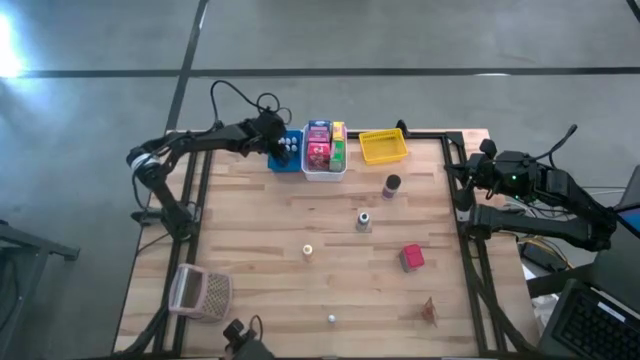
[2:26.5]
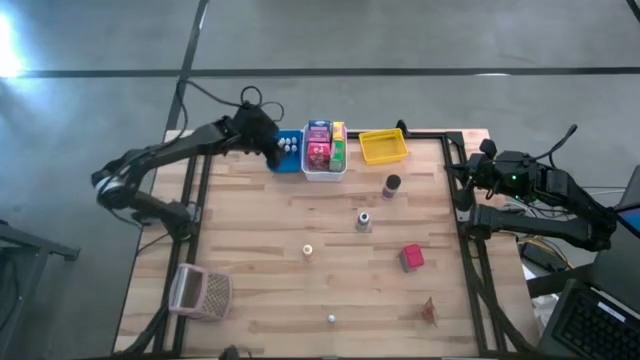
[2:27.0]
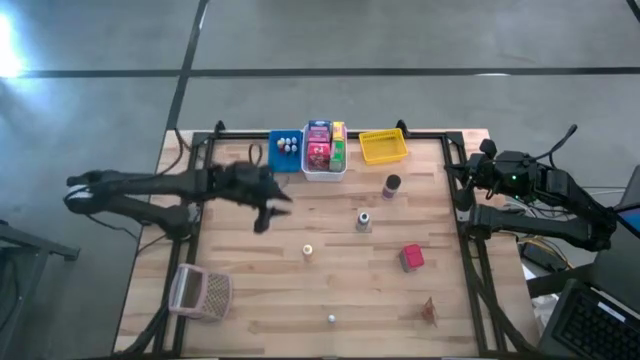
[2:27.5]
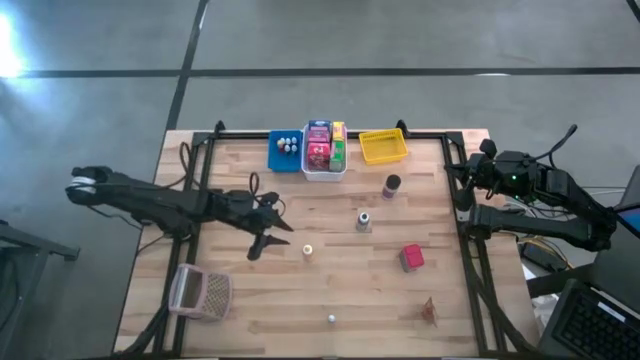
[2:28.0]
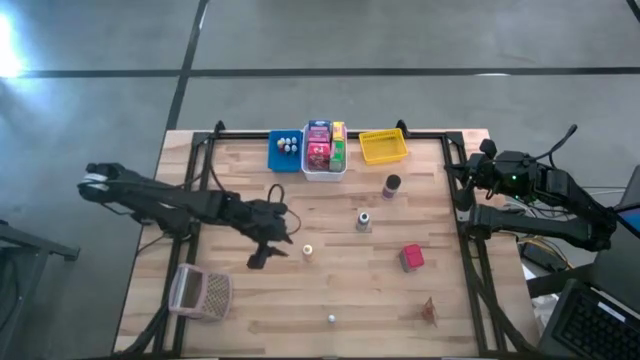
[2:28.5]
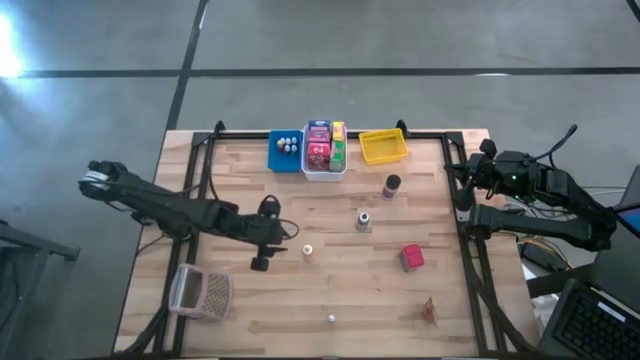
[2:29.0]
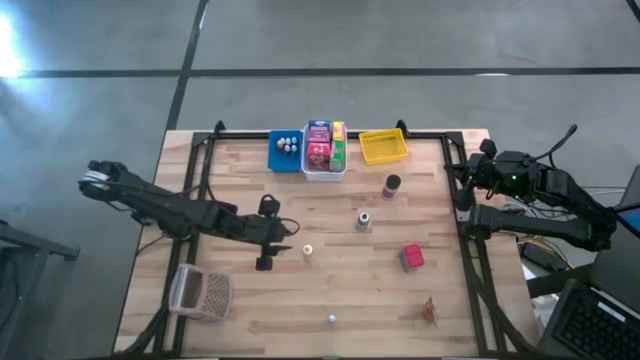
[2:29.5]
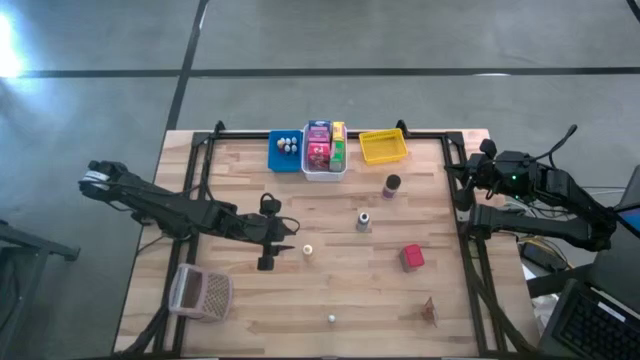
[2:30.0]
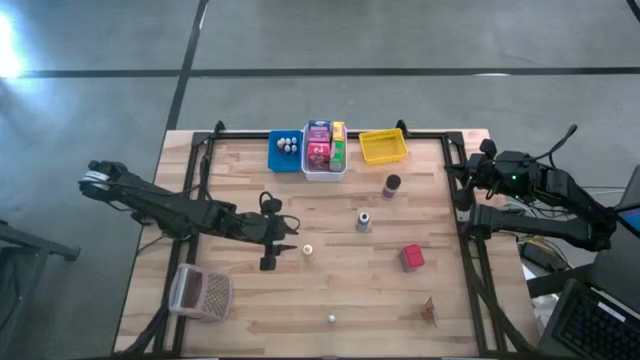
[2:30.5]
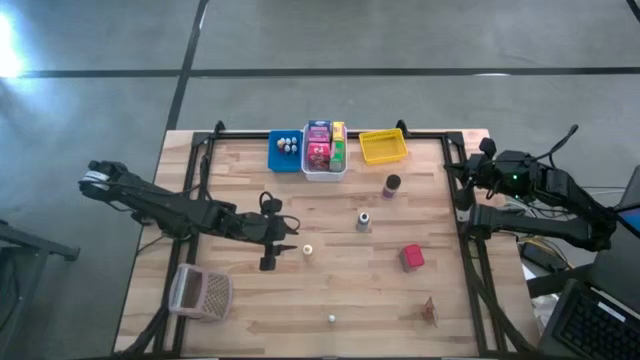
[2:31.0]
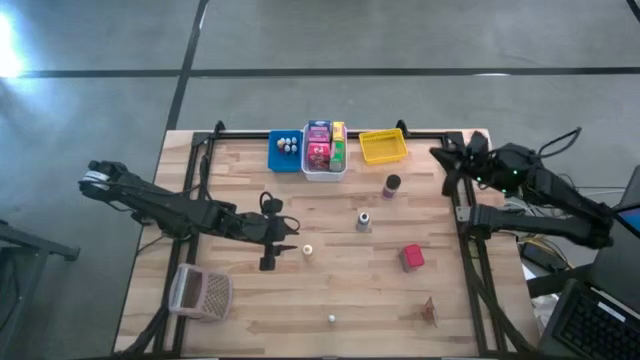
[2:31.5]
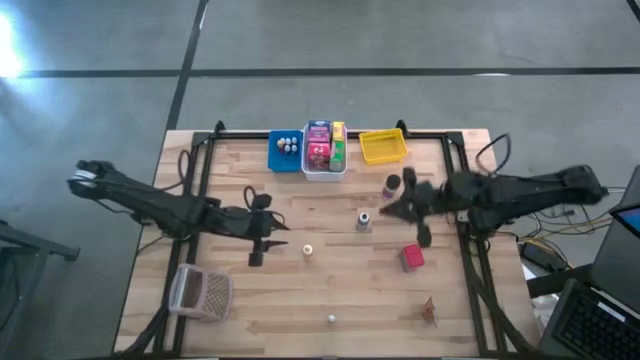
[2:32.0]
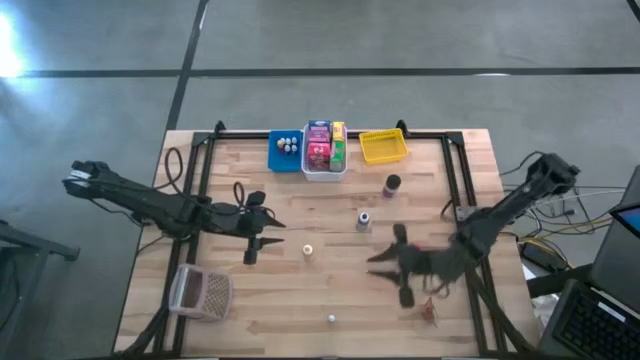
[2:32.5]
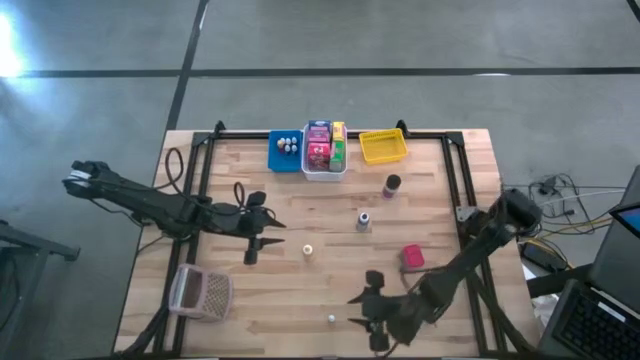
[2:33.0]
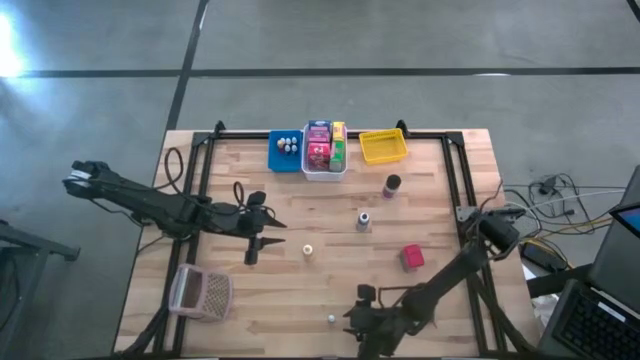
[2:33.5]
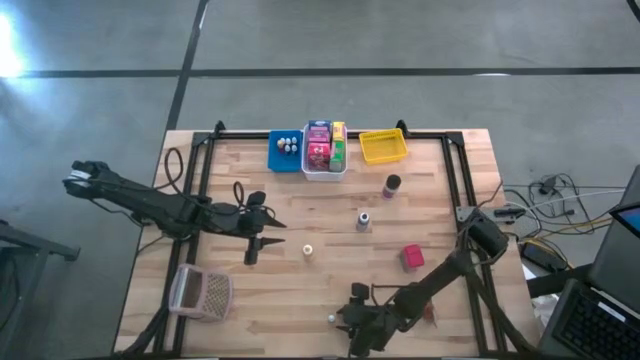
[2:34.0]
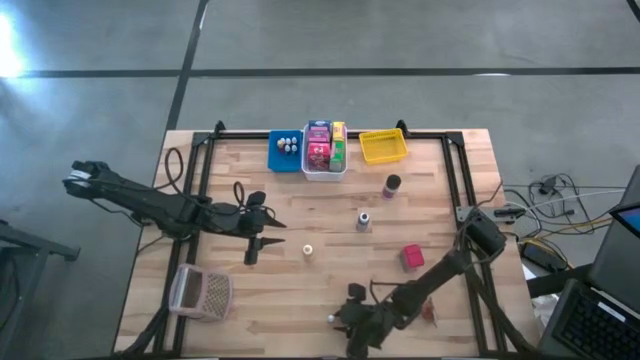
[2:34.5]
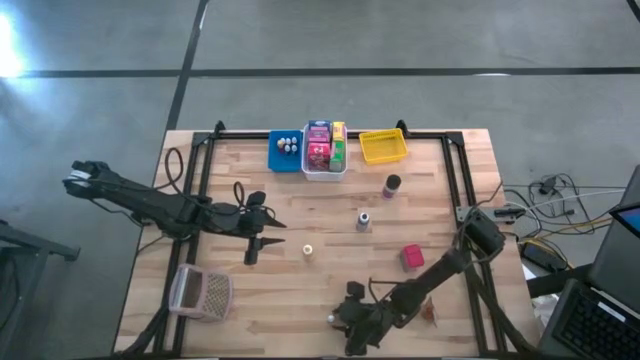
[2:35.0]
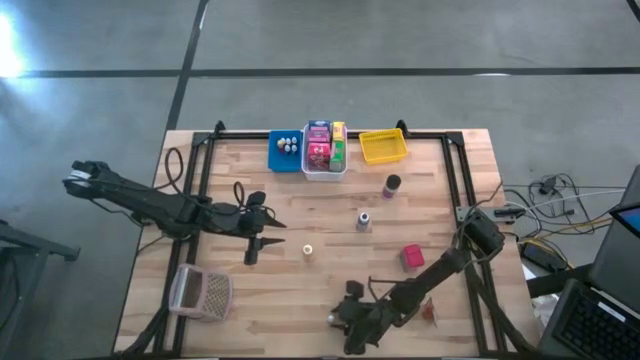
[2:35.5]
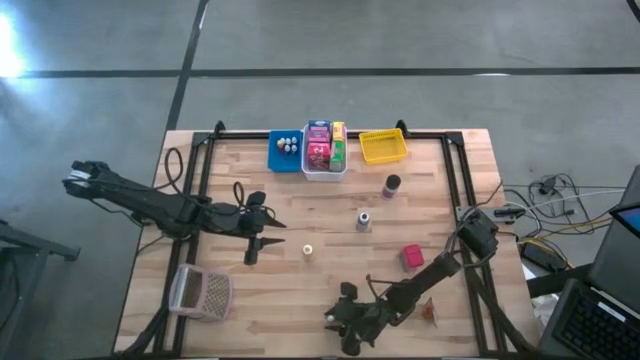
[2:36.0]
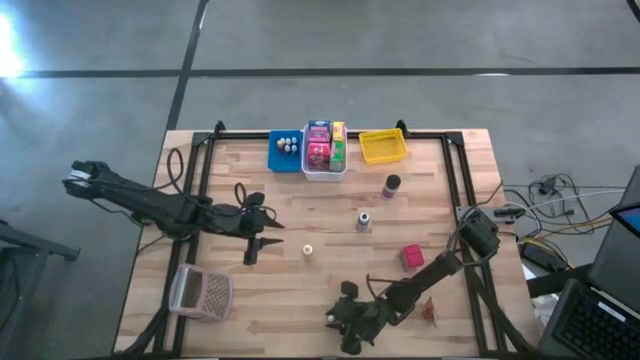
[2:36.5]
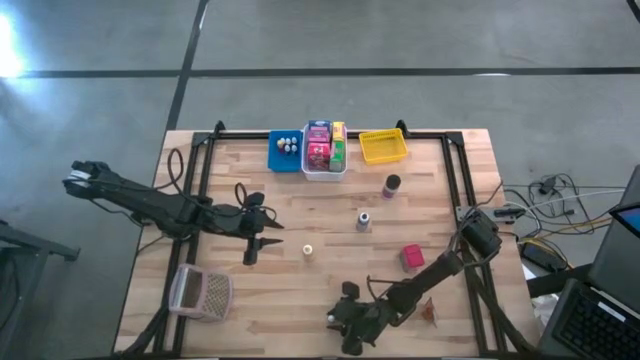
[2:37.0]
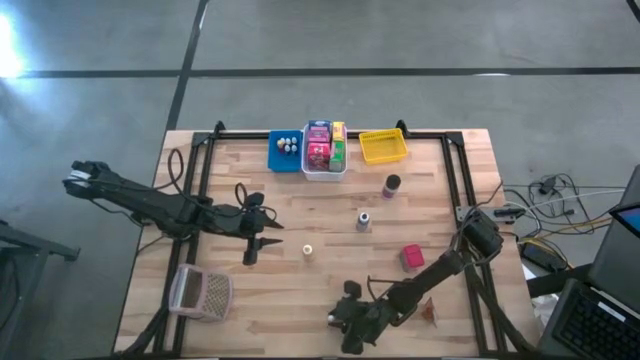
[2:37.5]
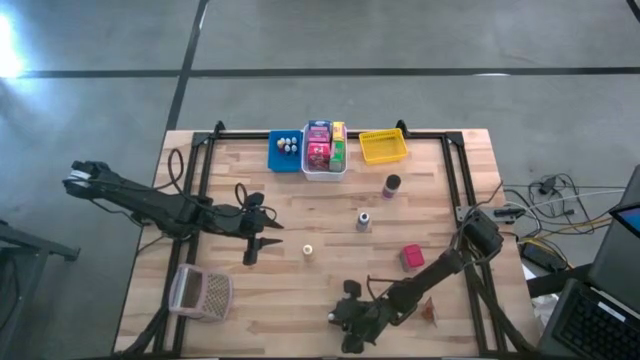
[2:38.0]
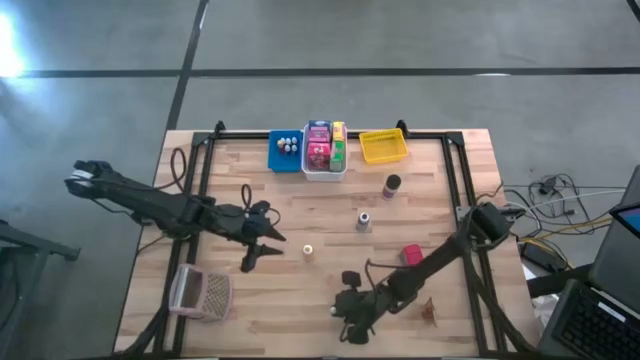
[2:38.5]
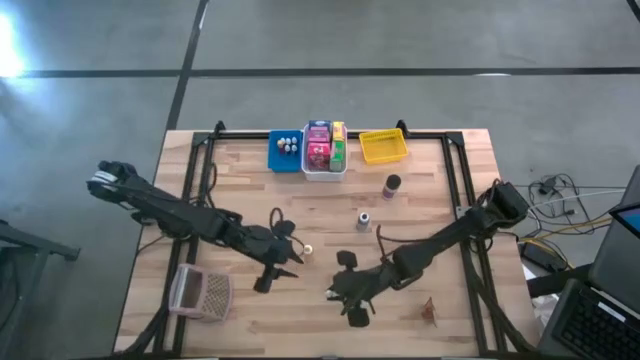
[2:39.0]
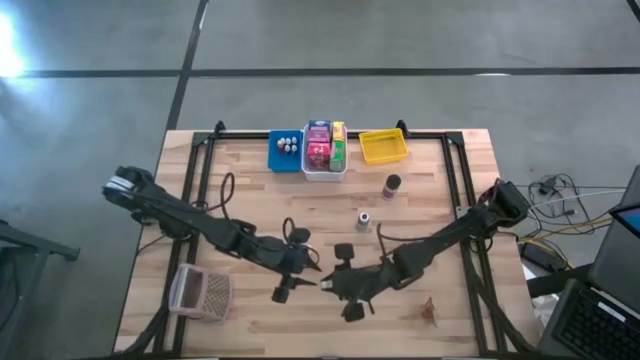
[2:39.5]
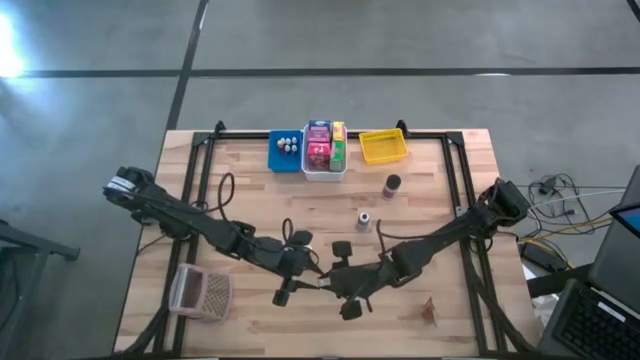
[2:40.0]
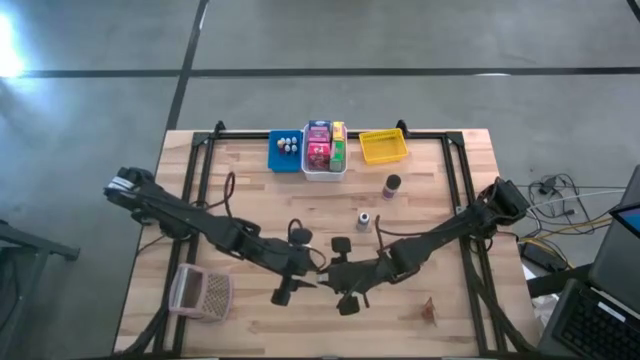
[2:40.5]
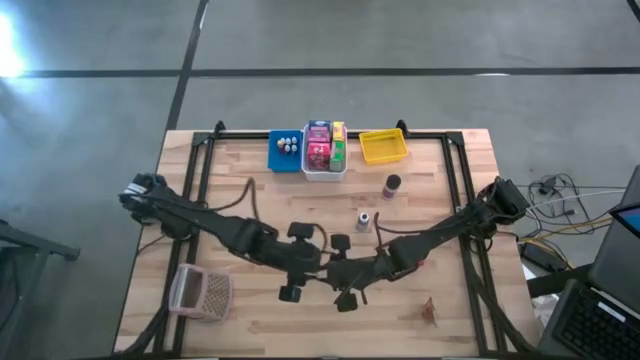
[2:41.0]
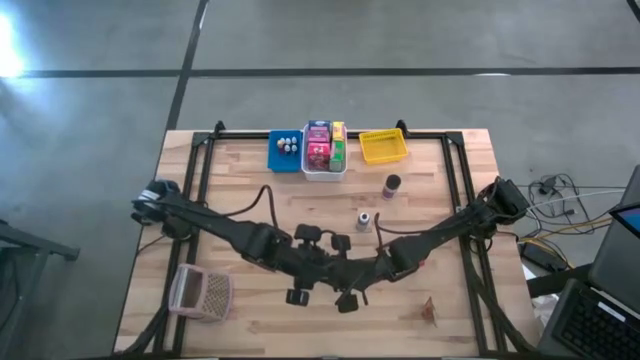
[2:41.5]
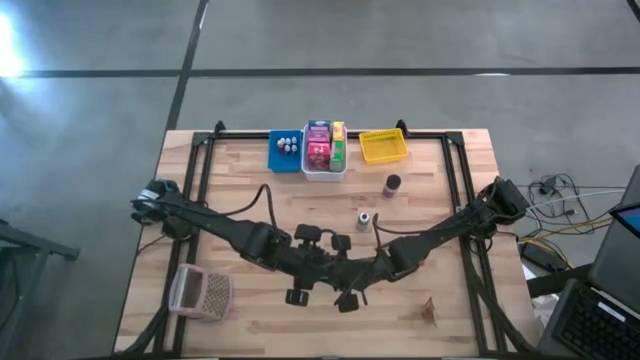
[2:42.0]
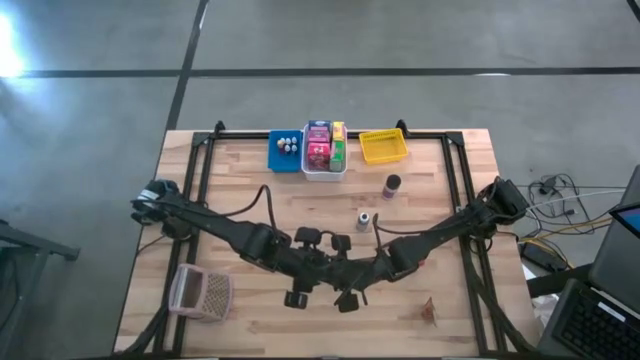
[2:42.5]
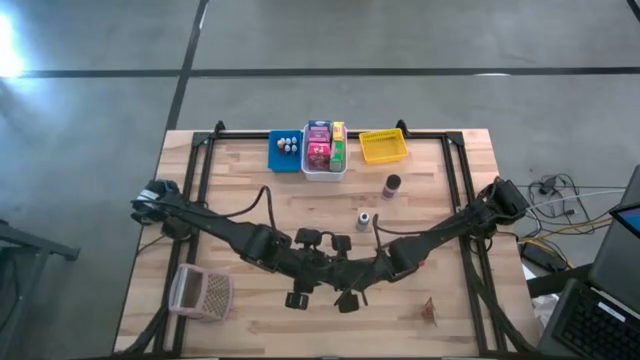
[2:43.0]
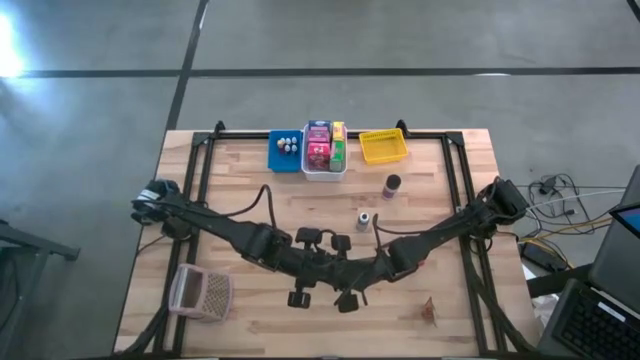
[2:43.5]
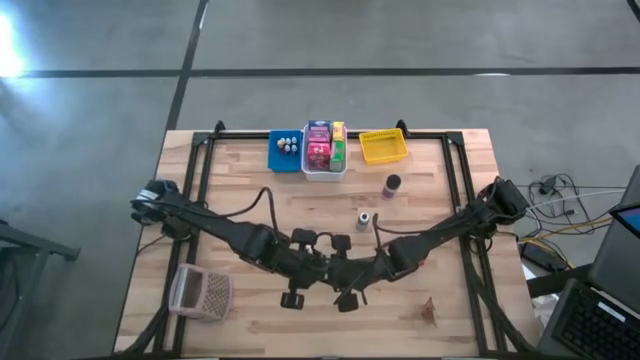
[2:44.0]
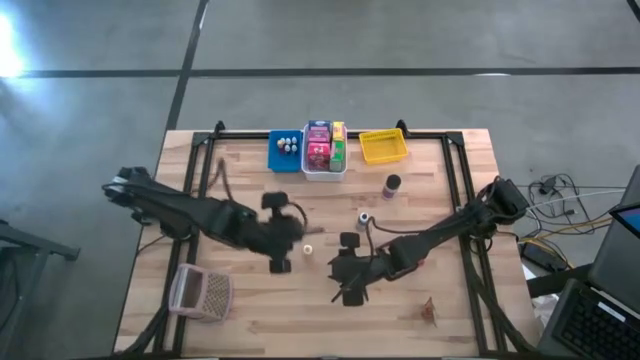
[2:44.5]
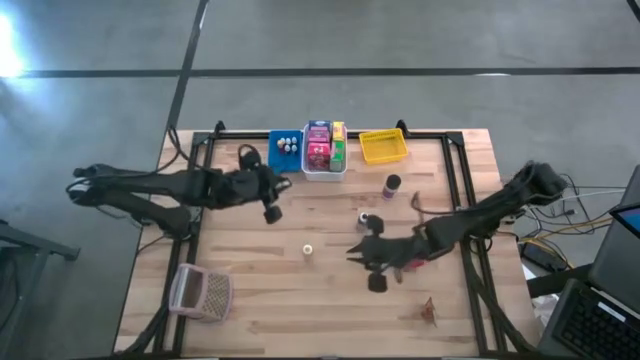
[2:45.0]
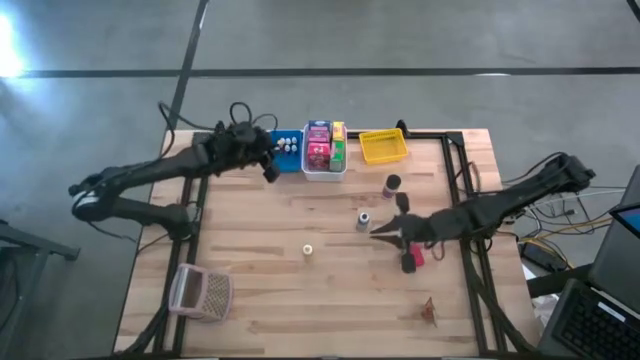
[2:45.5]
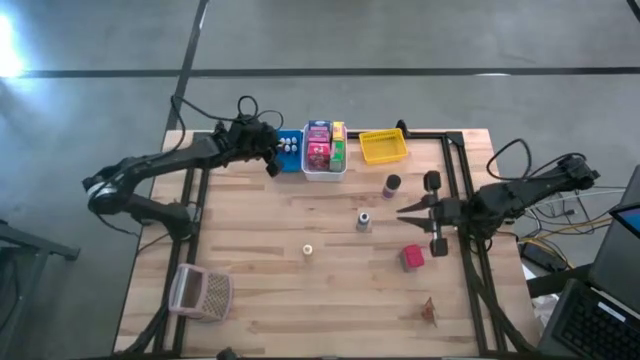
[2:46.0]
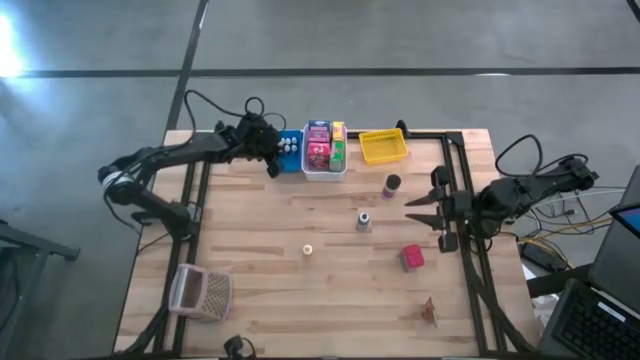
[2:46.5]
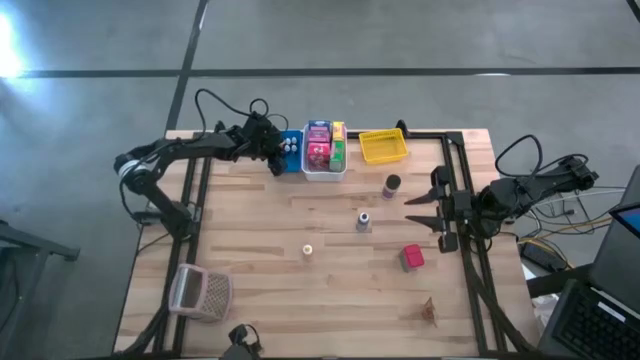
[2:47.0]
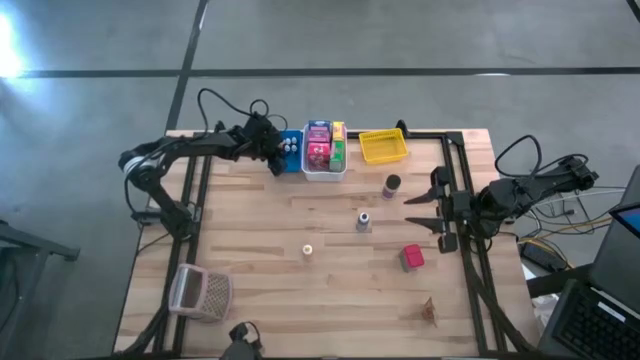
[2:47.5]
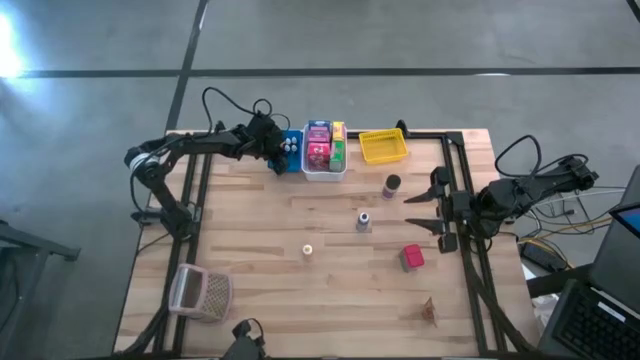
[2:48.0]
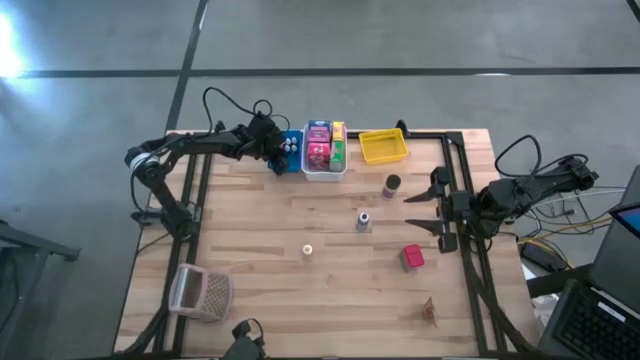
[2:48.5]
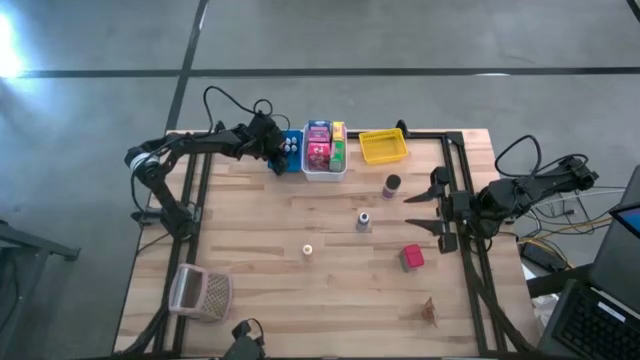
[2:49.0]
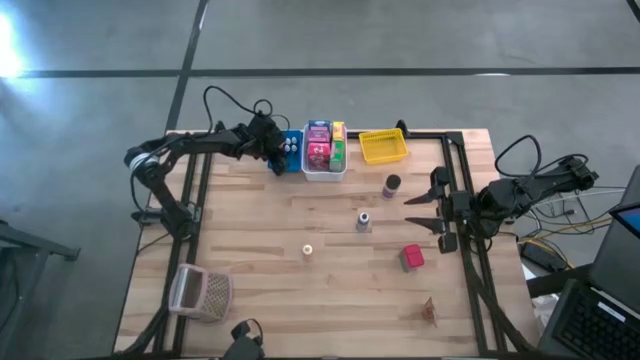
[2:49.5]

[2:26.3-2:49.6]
Task: Pick & Place Kitchen Items
Put the small black food coloring bottle into the blue bin
